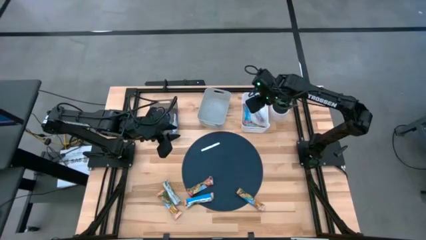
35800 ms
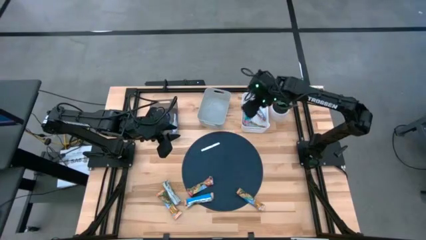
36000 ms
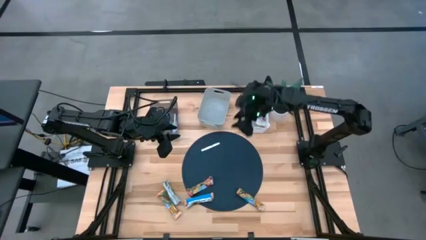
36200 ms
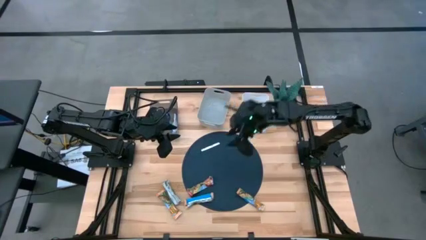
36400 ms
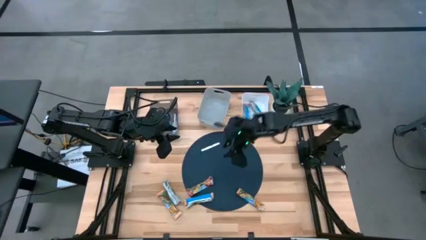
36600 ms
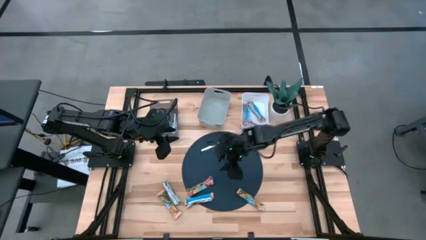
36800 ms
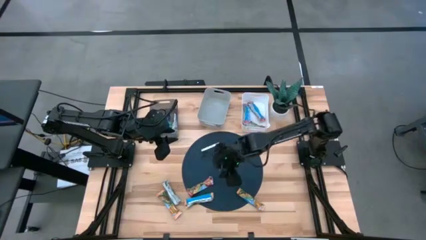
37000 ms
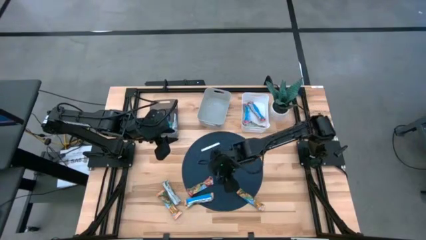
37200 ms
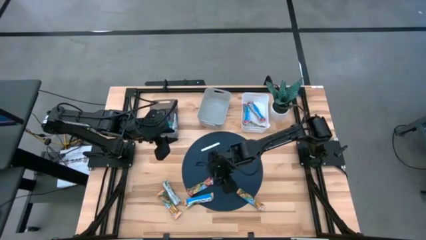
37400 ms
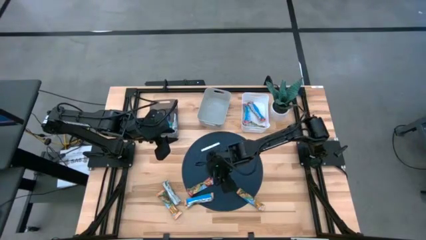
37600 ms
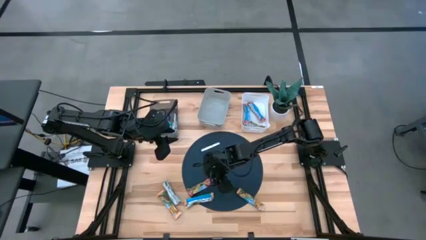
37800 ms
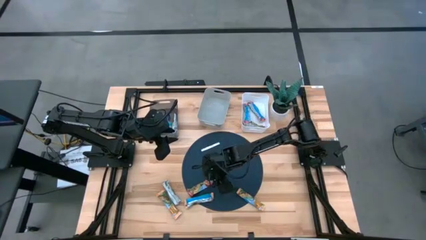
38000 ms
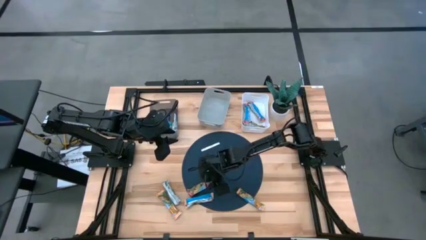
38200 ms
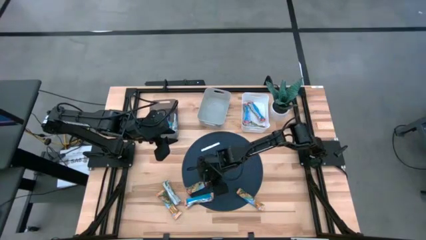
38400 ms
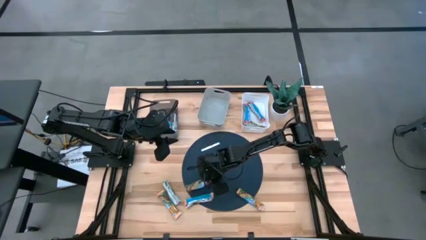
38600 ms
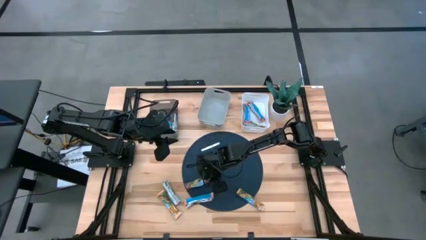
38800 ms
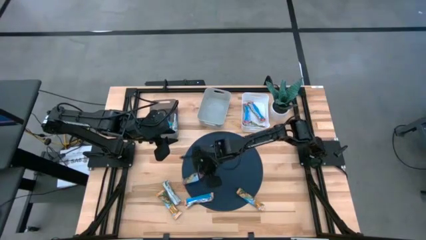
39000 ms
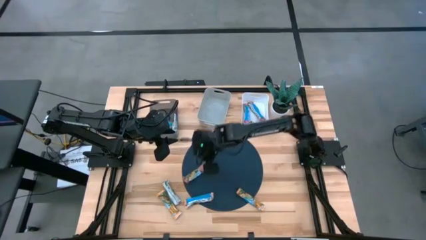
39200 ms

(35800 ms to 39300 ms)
Task: Pick and place Granola Bars by type
Put the red granola bar into the white bin

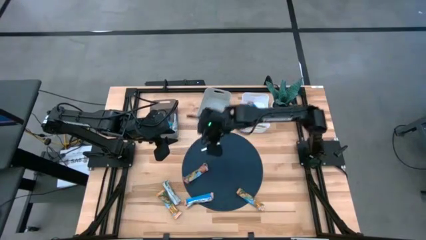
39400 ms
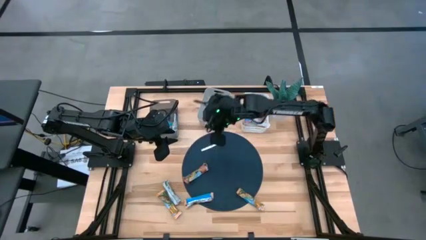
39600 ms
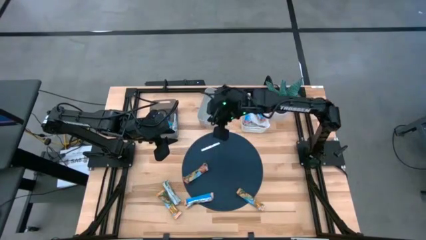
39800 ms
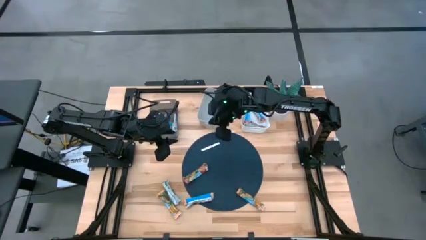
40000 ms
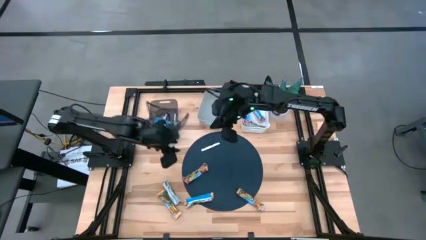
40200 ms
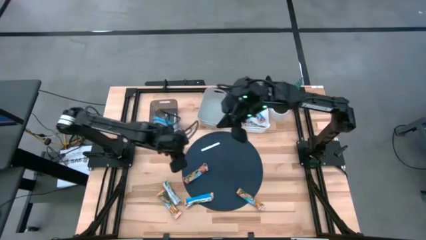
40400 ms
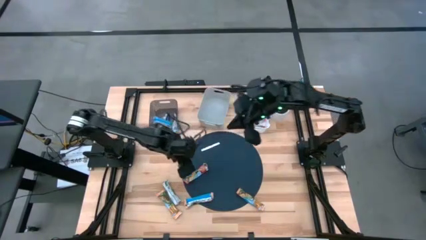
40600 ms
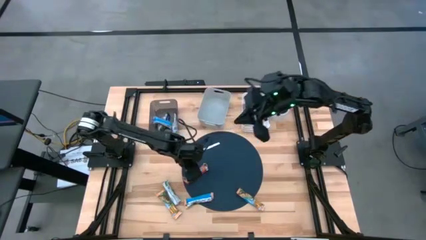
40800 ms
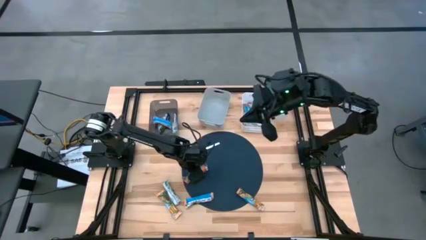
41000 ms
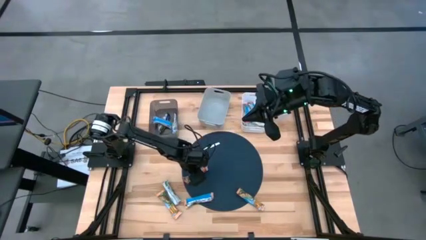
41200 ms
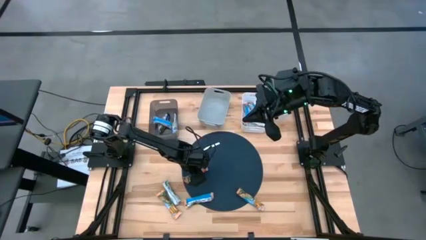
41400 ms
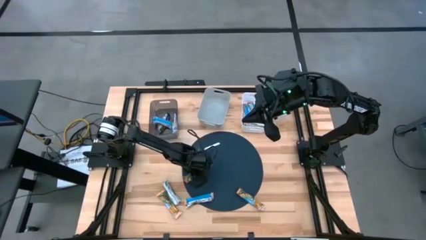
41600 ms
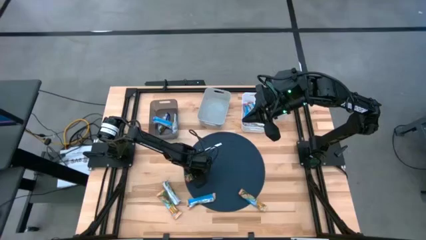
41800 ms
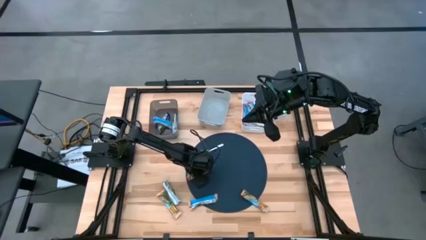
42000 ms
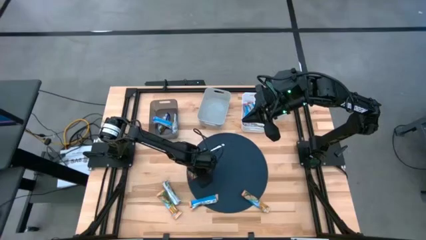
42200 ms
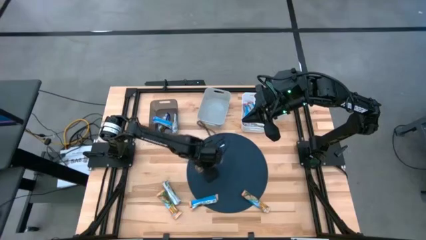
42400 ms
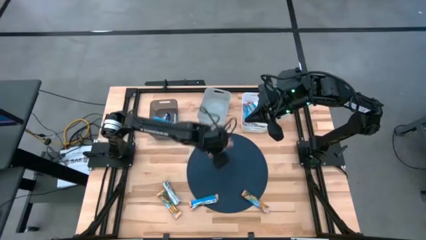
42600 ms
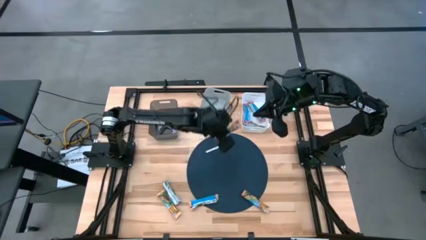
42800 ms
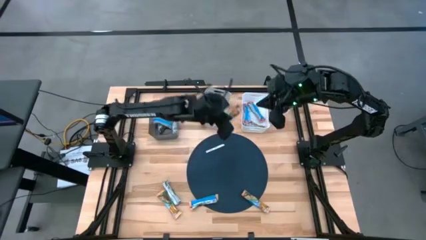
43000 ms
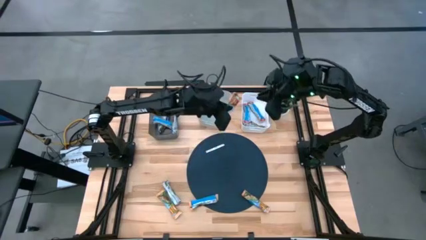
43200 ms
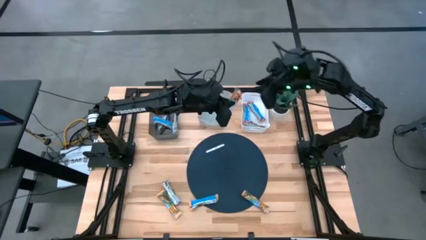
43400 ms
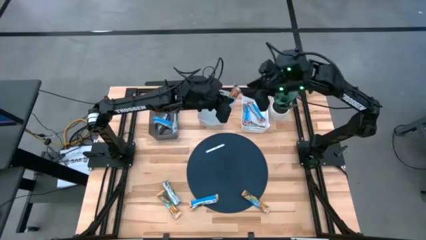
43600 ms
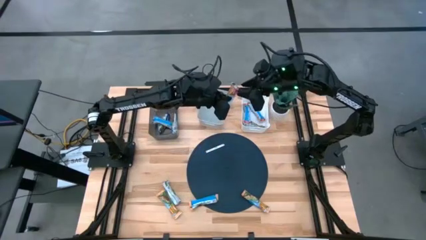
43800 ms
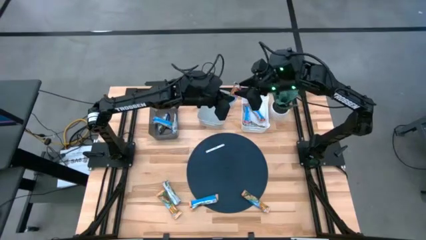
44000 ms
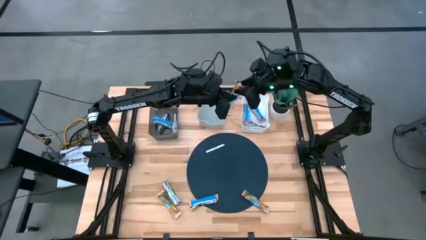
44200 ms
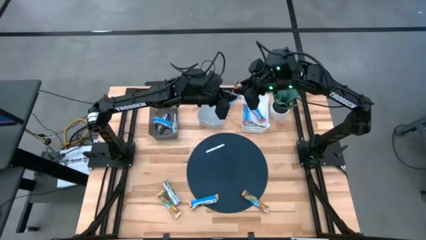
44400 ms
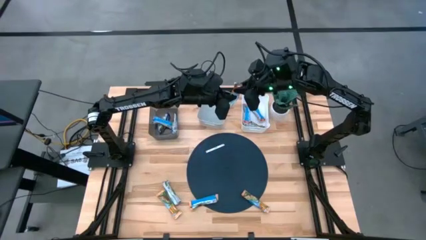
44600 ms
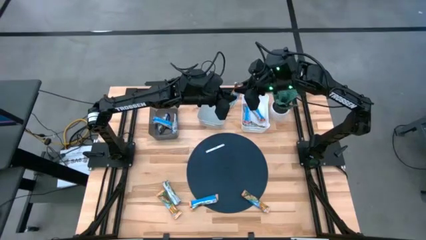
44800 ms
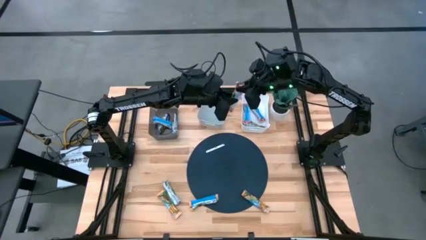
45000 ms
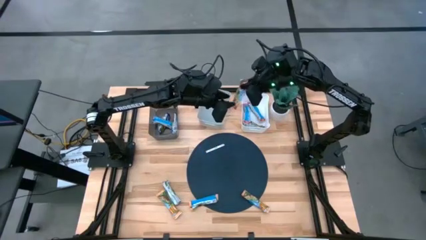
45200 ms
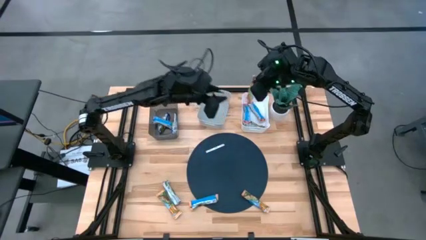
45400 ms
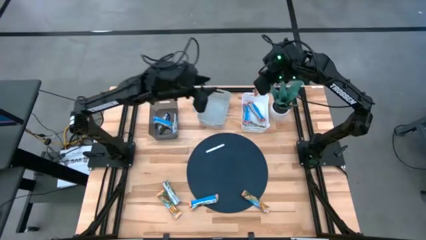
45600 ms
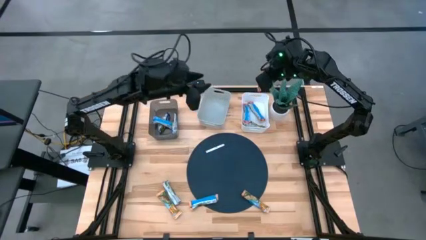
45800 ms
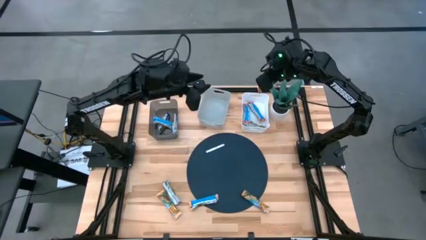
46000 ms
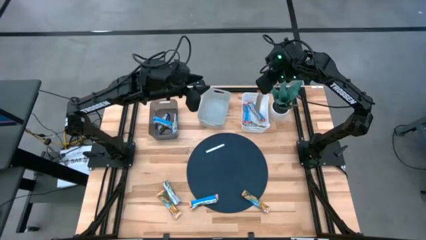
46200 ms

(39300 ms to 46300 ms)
Put the red granola bar into the white bin

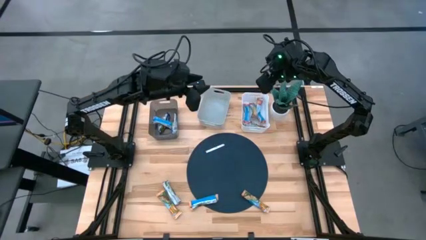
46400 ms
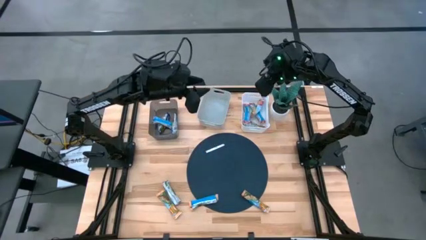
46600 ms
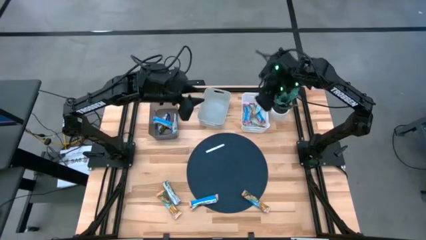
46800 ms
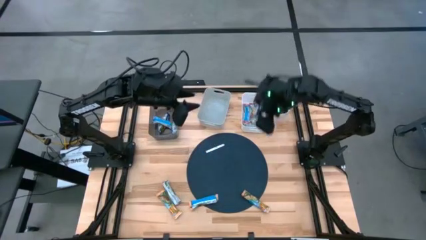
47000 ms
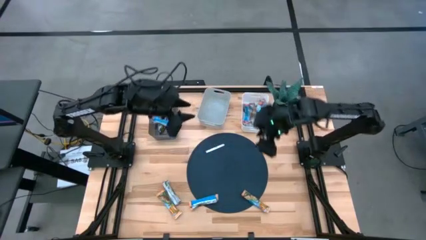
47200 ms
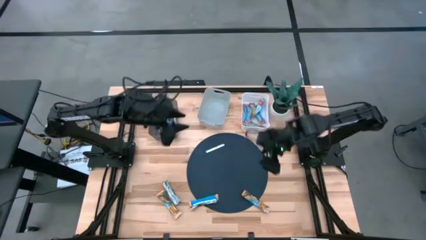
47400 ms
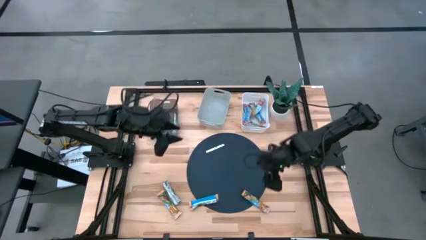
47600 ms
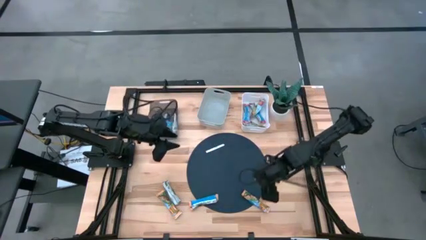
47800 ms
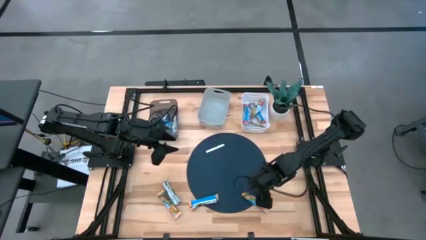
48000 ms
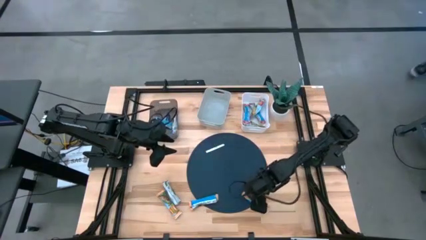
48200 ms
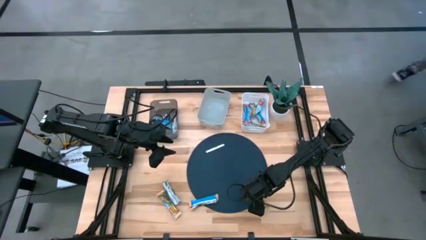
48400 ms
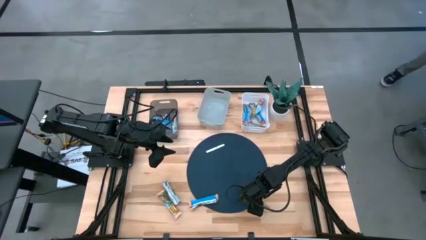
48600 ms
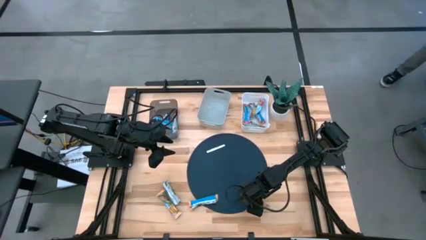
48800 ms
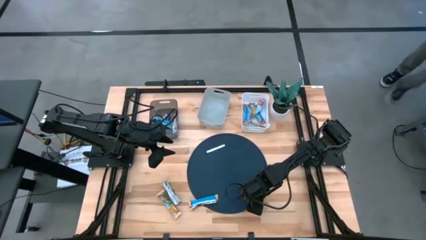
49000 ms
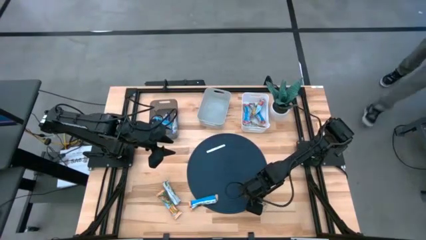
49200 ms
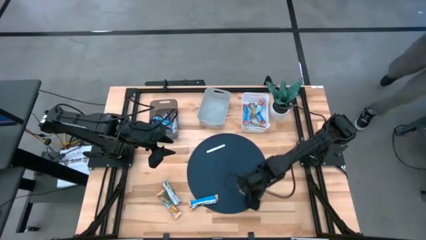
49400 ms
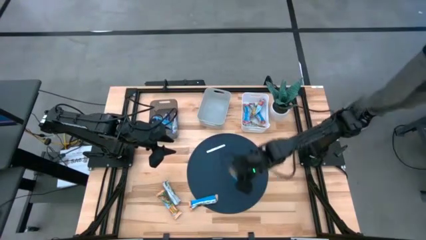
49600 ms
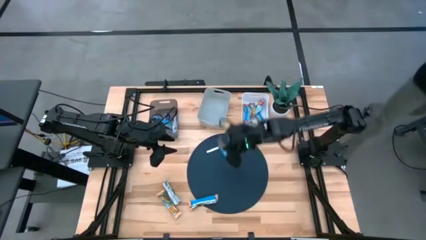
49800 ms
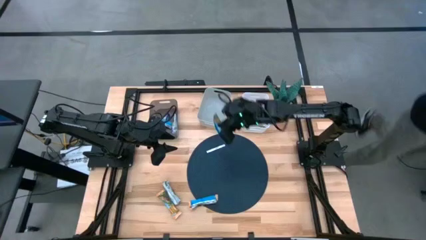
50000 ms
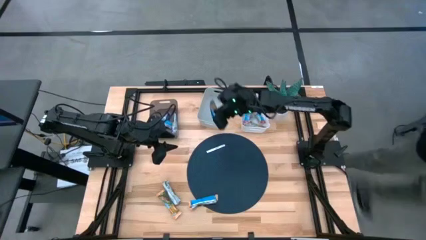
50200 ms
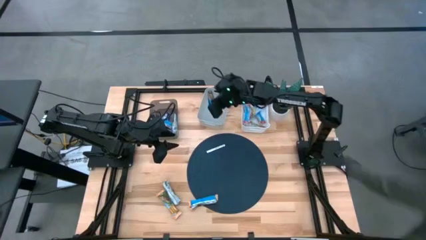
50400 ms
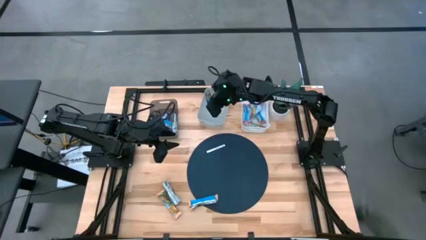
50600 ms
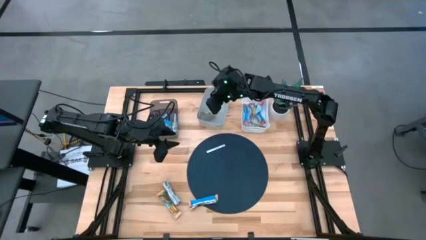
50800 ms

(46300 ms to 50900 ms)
Put the yellow granola bar into the gray bin

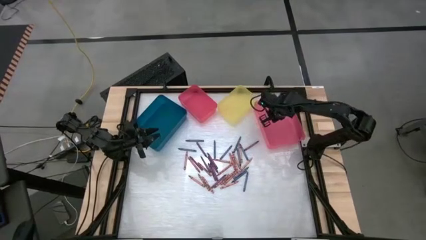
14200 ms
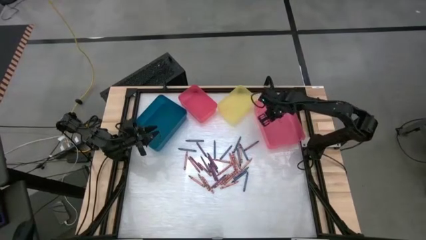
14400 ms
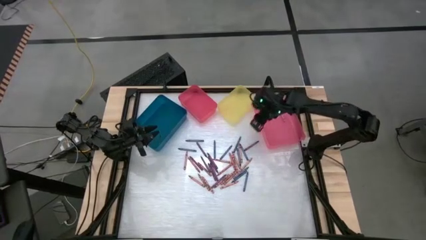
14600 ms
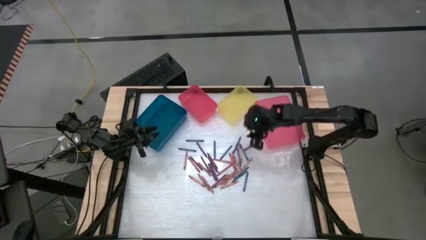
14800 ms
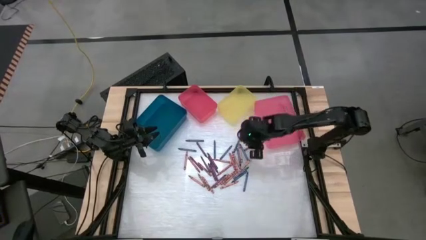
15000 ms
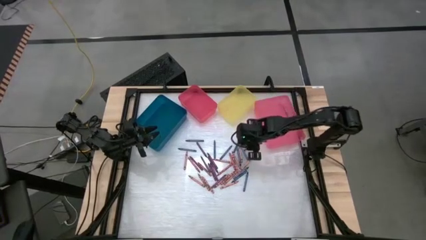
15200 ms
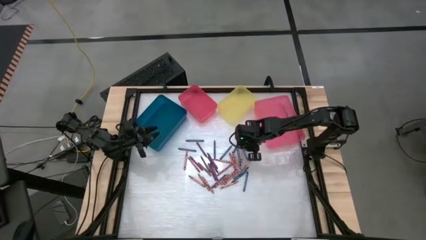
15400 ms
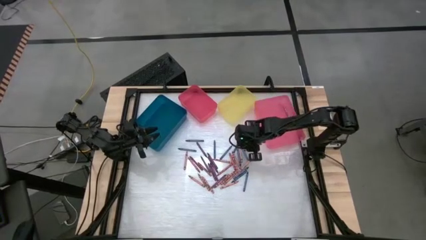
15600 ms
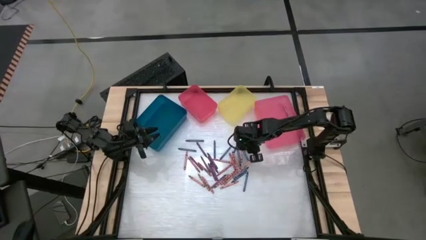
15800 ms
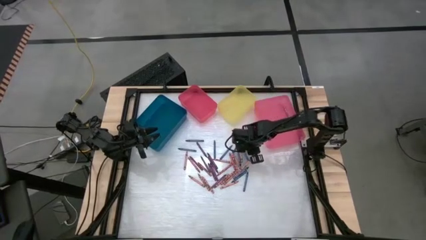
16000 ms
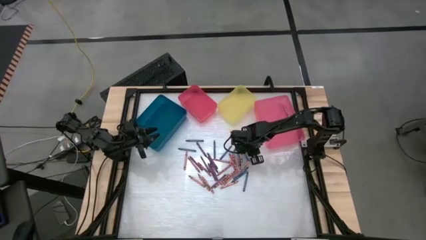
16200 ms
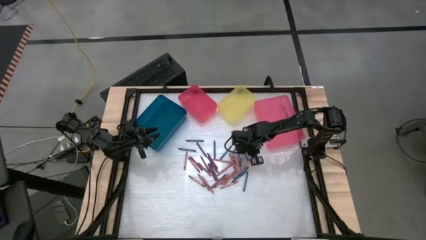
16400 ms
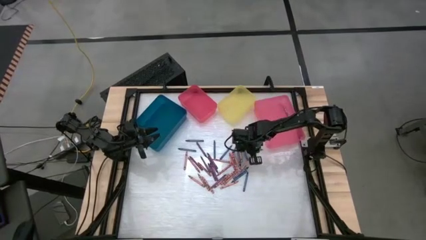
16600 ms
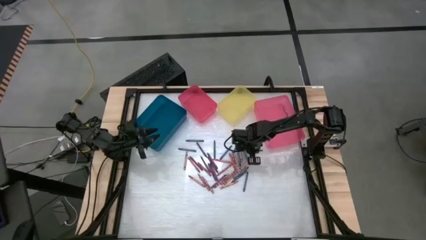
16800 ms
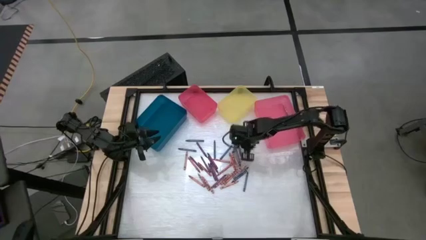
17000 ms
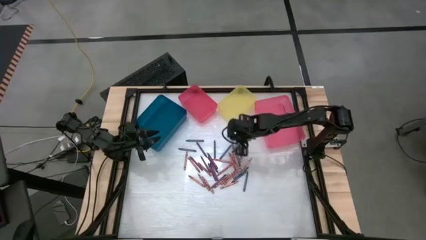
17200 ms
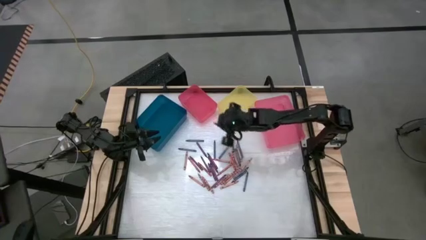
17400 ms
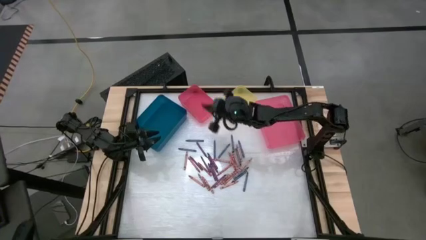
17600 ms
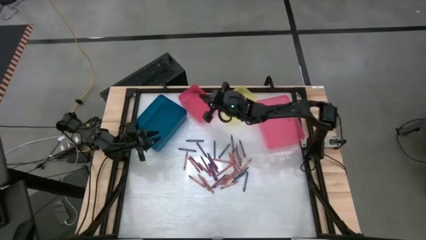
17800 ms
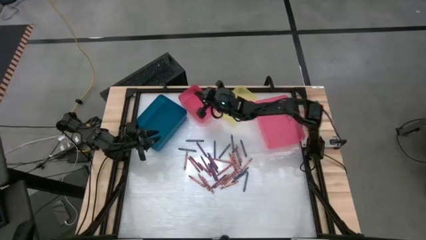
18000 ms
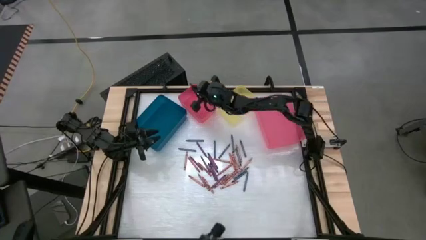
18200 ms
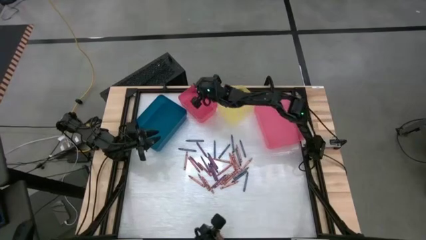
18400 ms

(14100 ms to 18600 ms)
Task: Sort crayons
Put the violet crayon into the left pink bin
